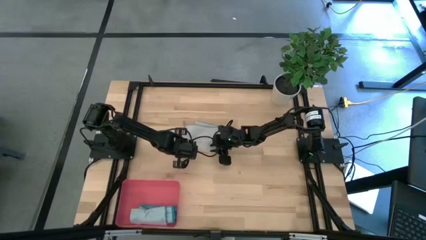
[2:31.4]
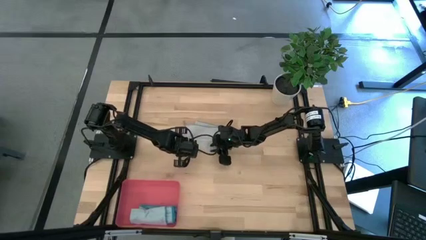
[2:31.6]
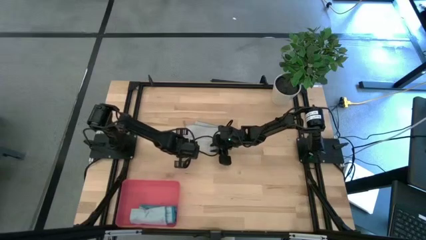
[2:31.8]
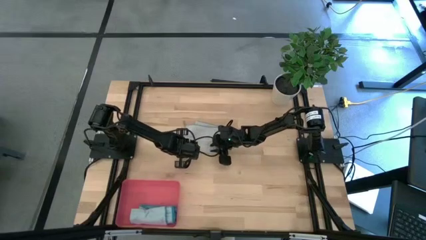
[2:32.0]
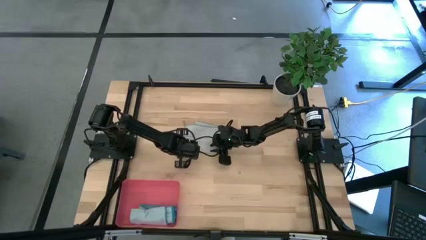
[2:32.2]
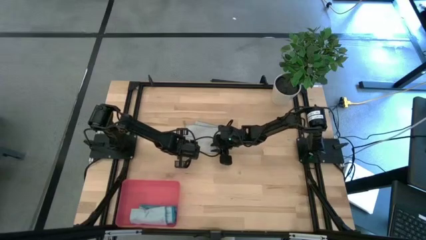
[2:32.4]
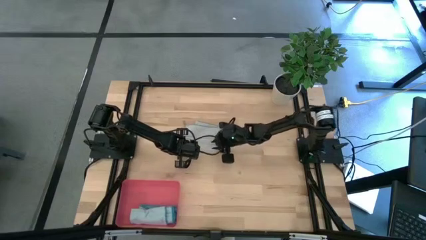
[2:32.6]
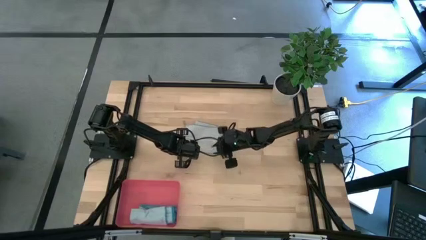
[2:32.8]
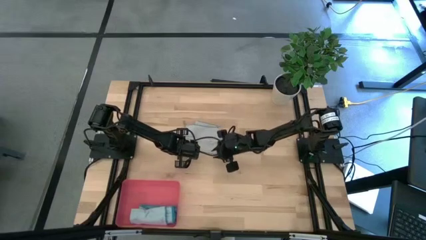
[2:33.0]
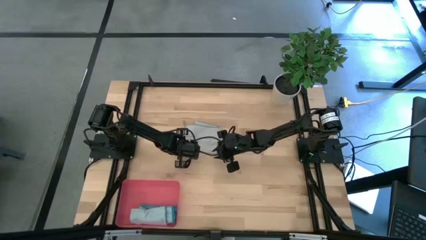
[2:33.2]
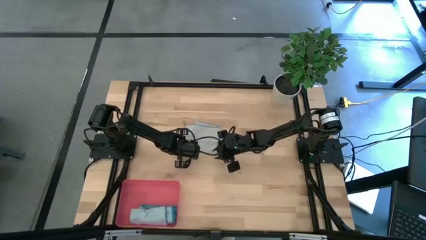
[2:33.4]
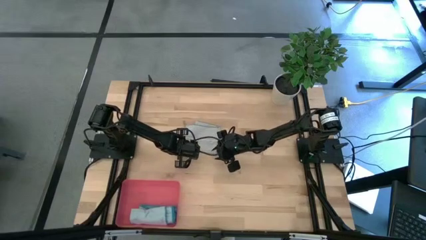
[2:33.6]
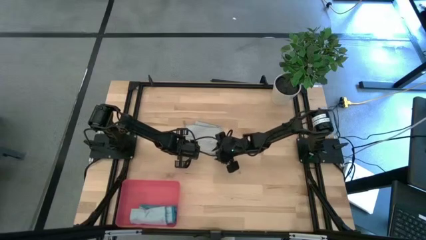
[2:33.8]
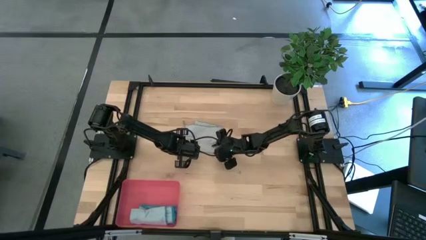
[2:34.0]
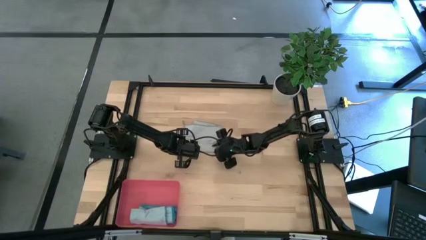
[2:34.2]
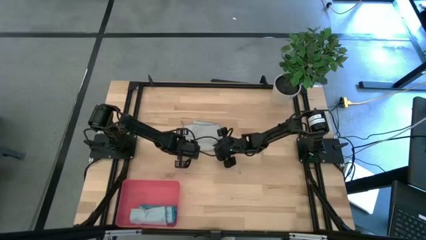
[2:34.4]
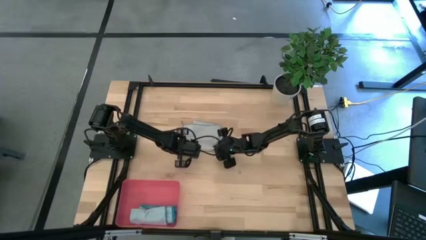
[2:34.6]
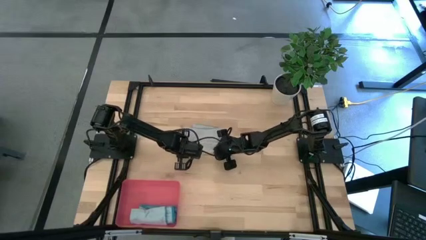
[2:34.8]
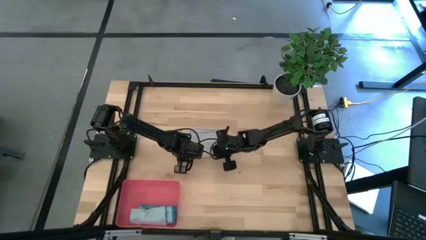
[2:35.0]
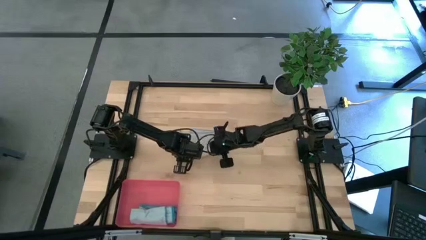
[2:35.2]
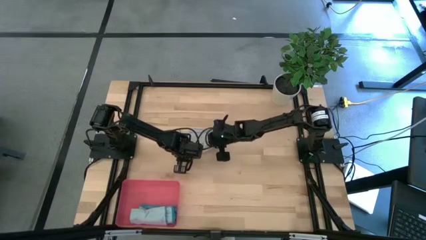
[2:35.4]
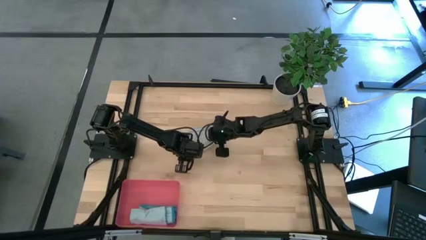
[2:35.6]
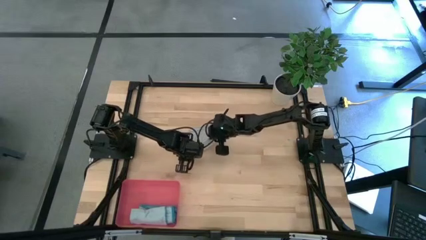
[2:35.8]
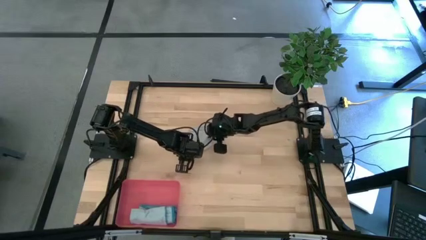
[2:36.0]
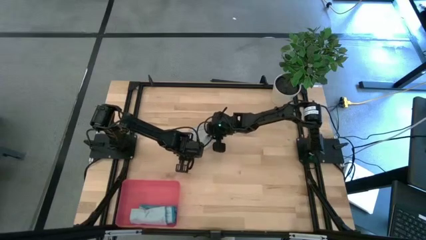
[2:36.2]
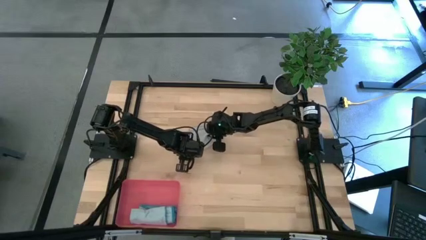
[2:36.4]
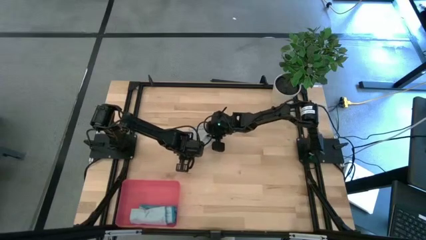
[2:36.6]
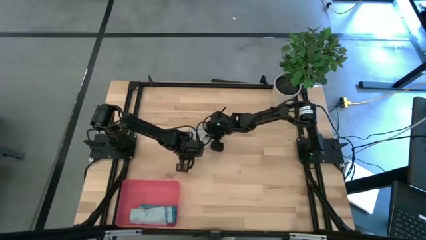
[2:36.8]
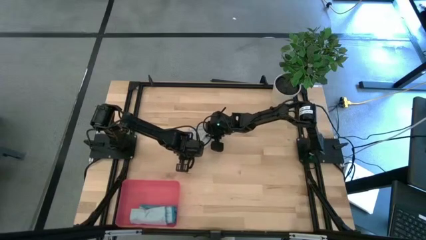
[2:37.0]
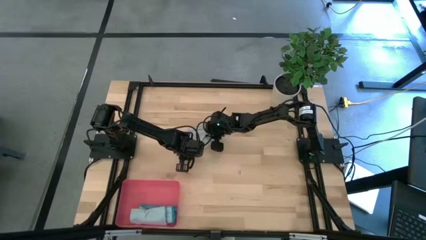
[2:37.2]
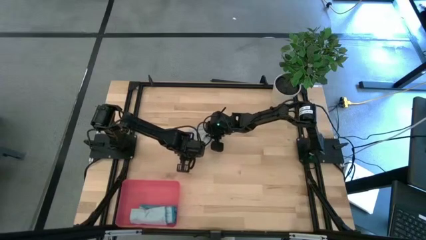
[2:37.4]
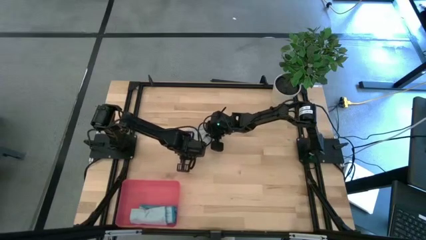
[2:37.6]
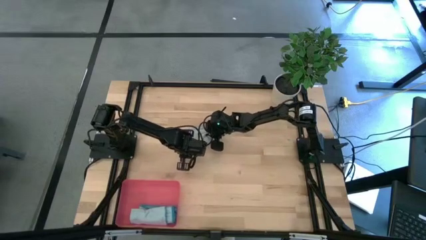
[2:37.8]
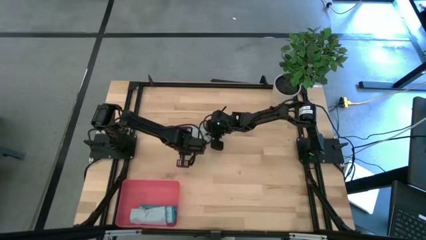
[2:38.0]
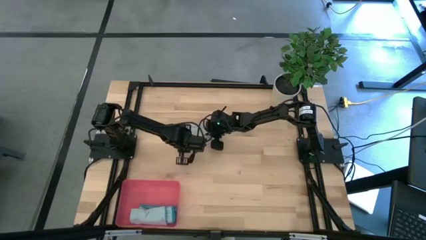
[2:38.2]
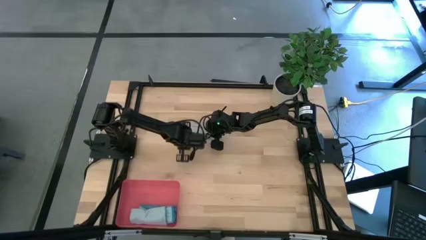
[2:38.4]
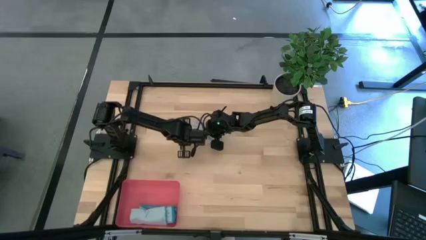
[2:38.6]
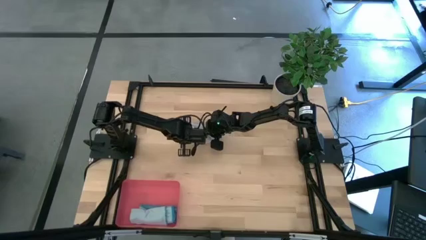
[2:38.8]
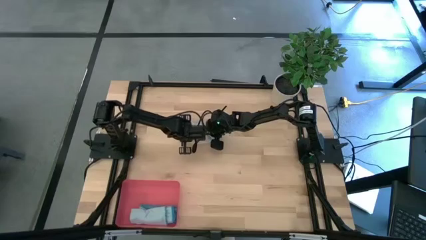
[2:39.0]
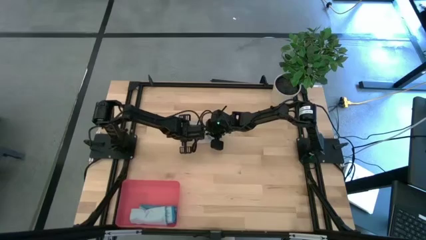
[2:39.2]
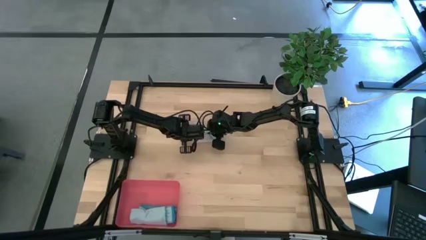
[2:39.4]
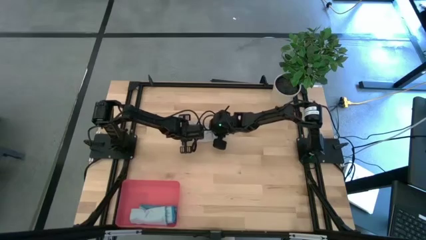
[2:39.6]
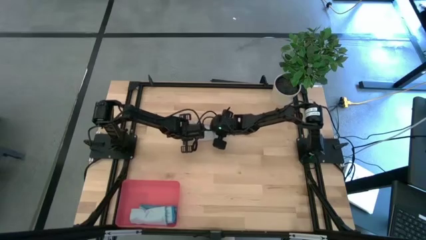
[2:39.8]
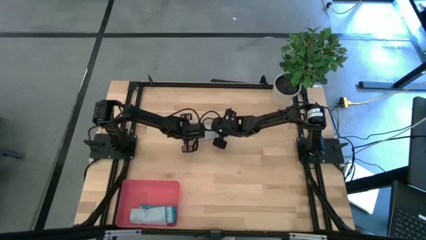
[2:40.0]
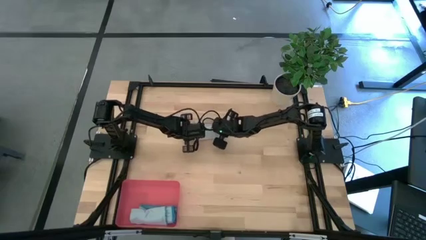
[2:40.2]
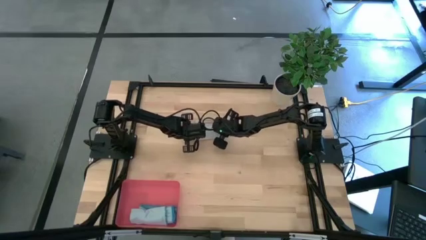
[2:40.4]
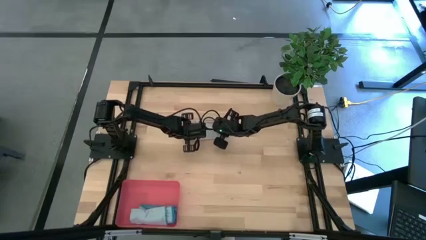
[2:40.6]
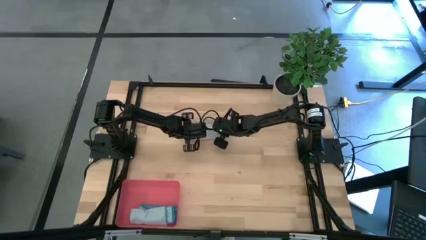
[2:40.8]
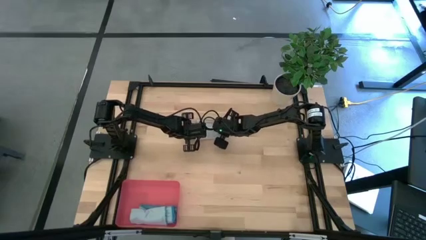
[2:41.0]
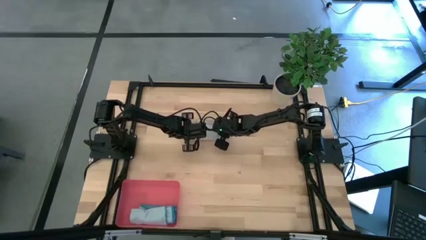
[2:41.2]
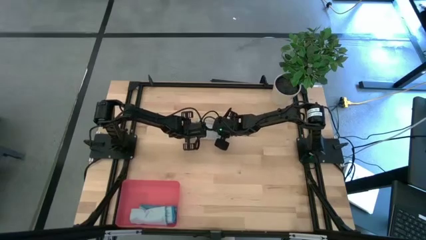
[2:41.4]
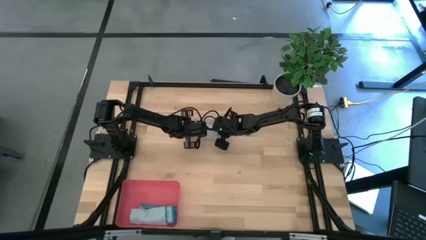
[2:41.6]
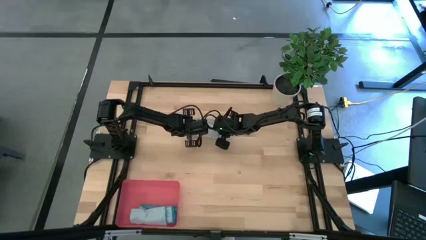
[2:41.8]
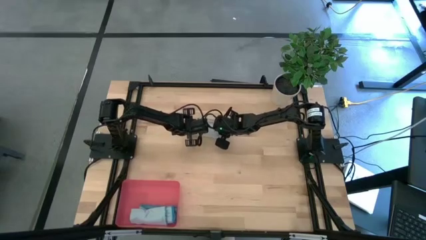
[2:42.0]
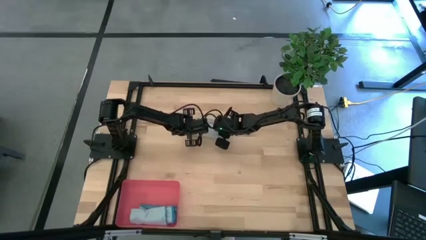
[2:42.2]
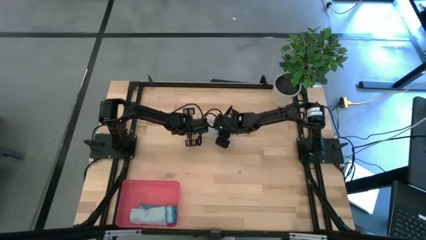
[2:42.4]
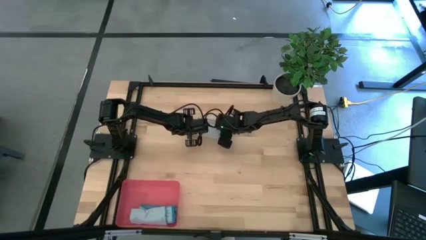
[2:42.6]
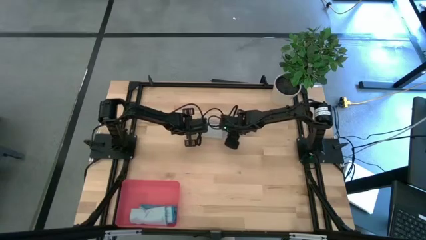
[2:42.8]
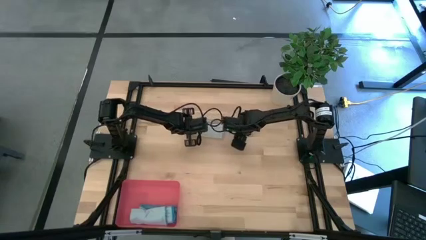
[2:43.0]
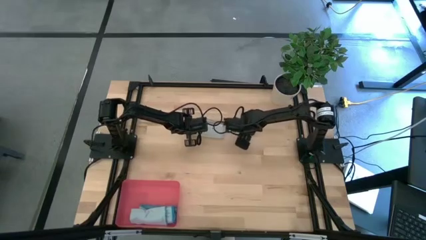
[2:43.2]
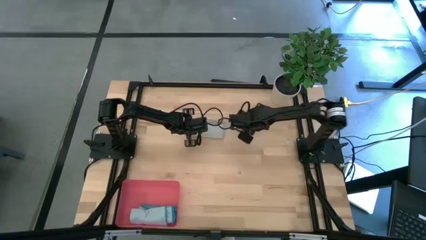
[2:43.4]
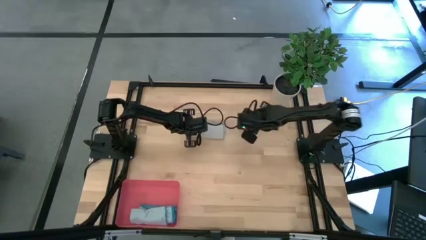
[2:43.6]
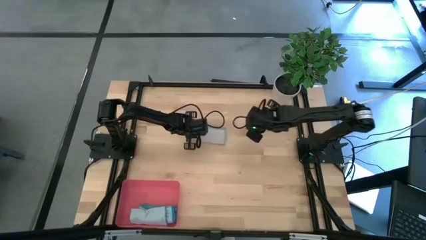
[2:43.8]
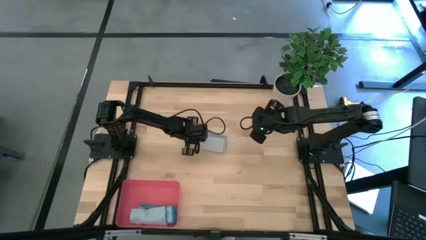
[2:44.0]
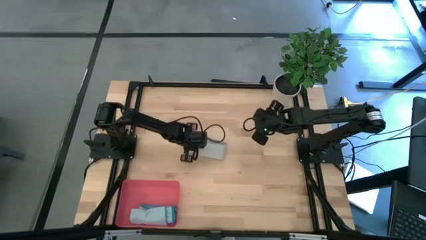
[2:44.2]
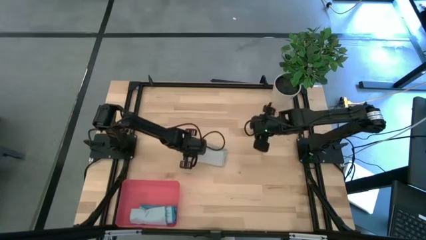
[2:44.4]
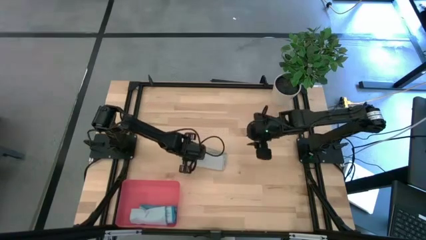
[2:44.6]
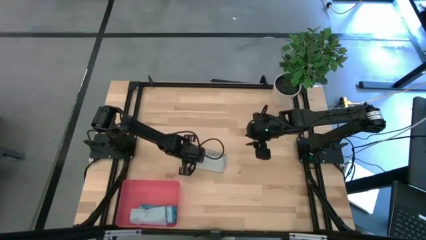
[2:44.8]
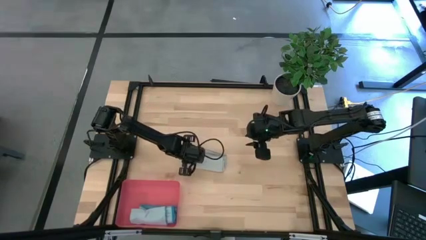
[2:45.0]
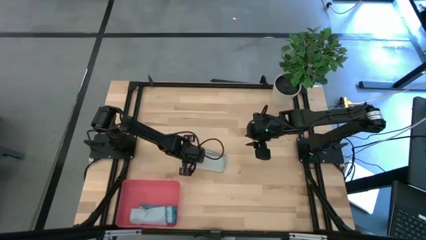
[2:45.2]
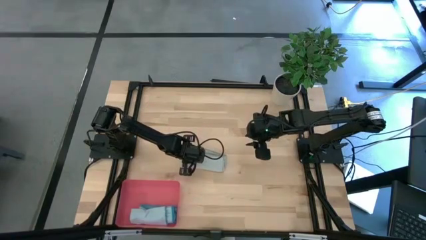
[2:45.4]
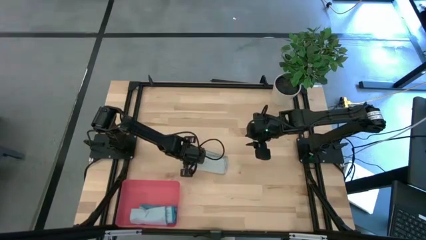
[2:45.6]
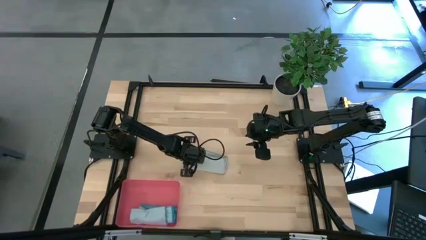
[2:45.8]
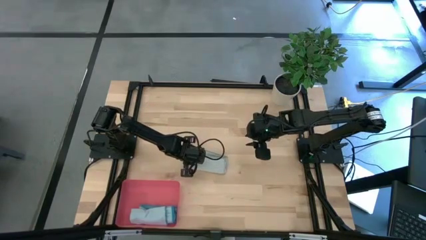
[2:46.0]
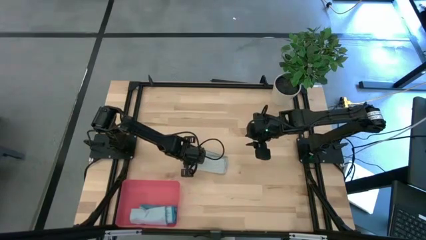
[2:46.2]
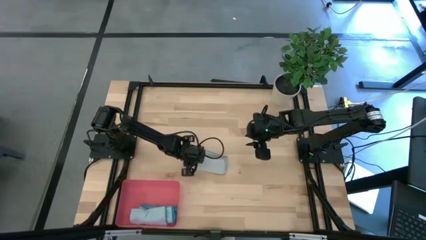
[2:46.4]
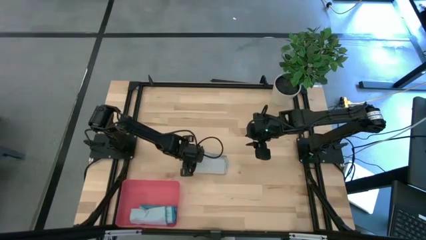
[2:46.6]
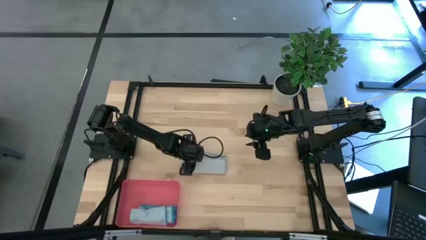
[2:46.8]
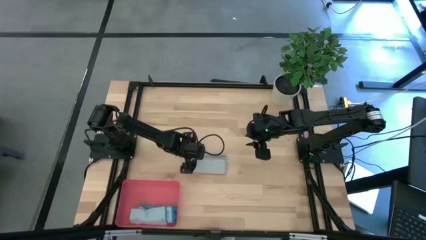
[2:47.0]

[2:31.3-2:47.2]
Task: Roll microfiber towels into tight, uniform cylinder then place into a basket
Roll the gray towel
